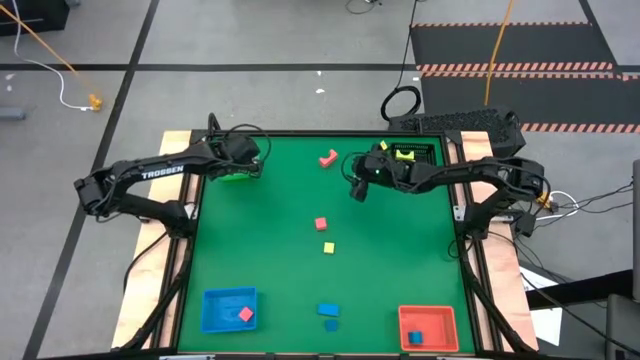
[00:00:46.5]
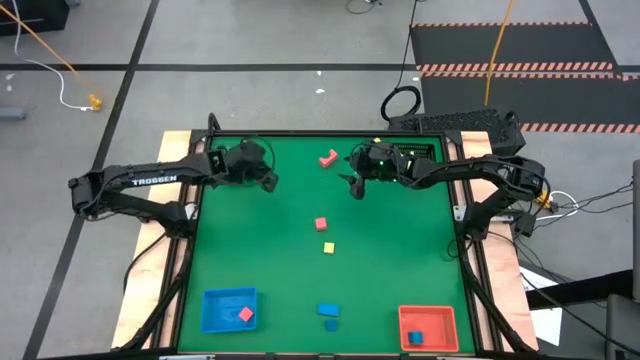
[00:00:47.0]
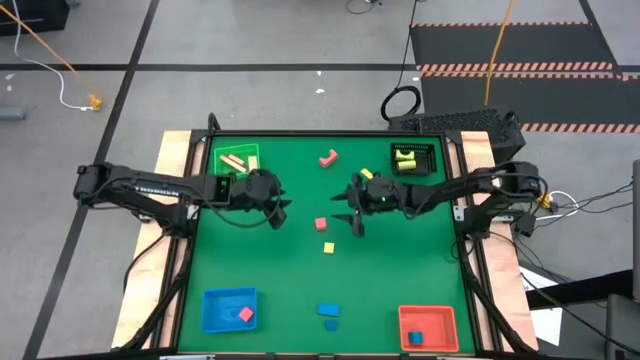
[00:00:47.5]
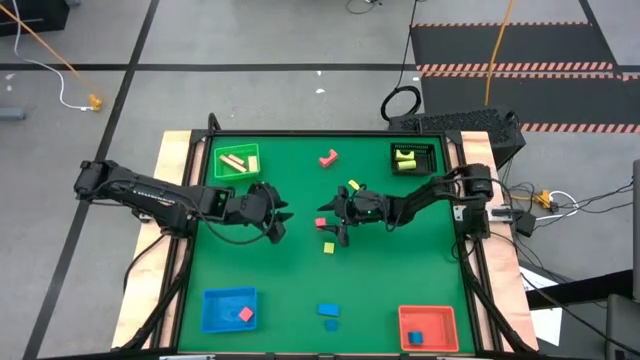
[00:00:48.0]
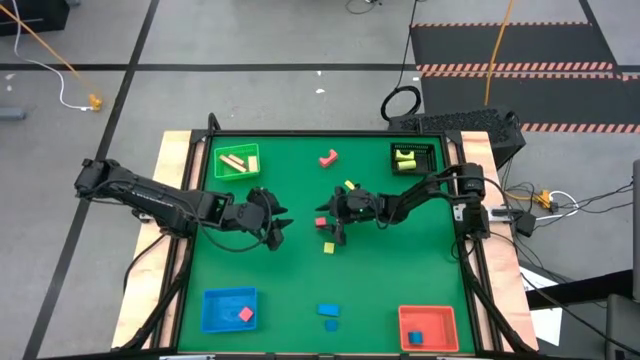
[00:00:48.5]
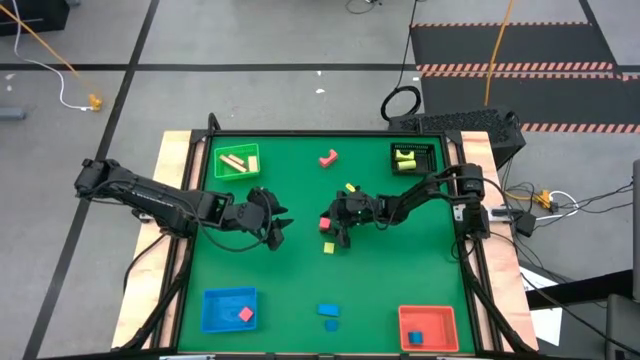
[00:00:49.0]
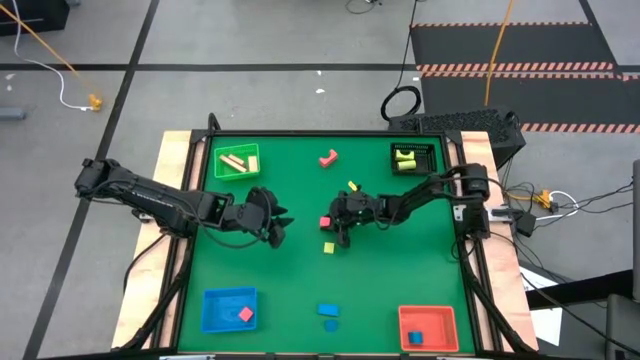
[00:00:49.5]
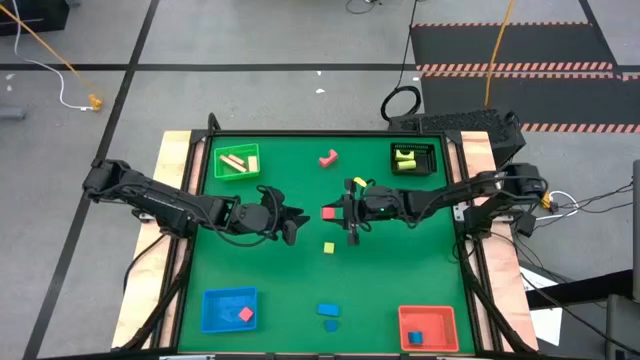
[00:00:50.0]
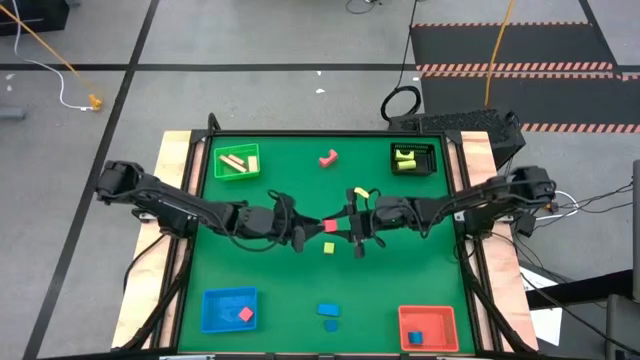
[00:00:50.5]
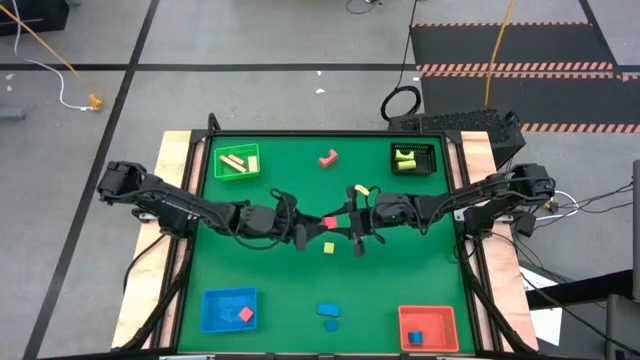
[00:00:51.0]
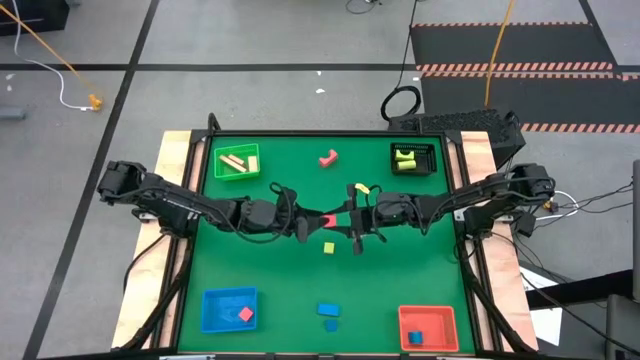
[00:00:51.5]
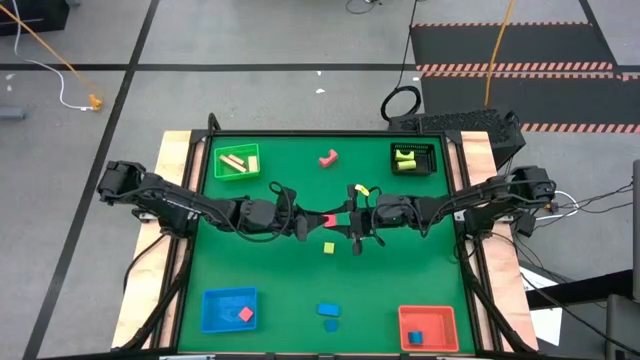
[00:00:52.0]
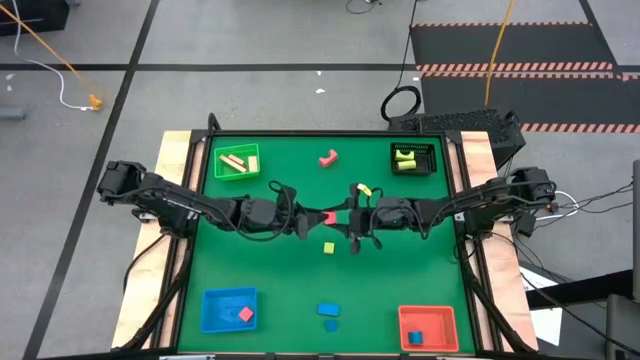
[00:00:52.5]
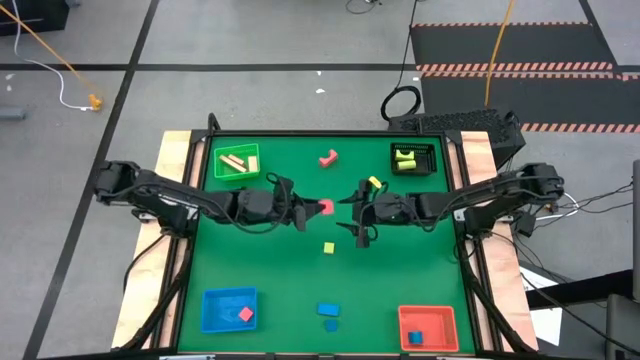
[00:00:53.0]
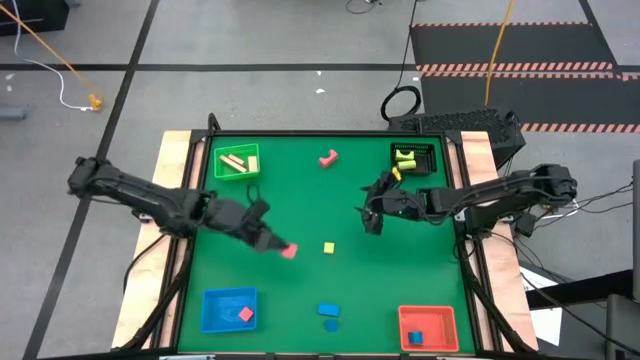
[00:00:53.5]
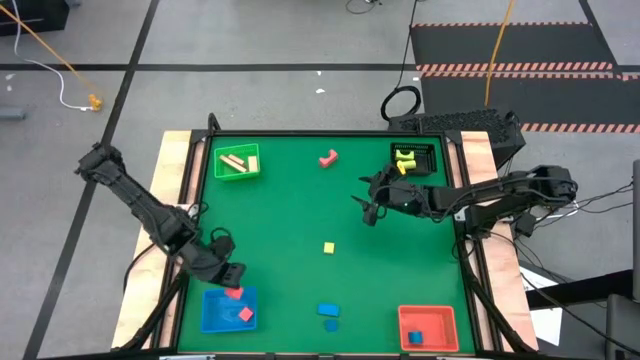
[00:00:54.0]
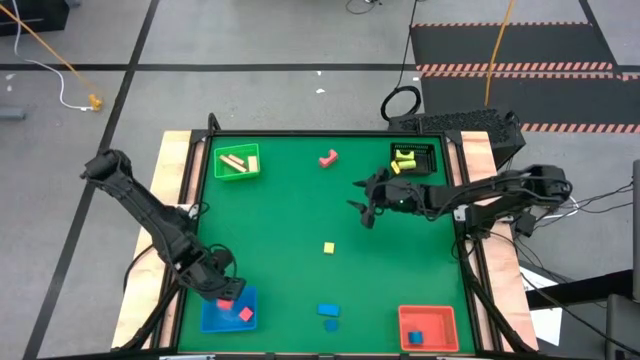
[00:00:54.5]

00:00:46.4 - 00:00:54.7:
Task: Sort & place blocks by color
Put the bottom orange block into the blue bin

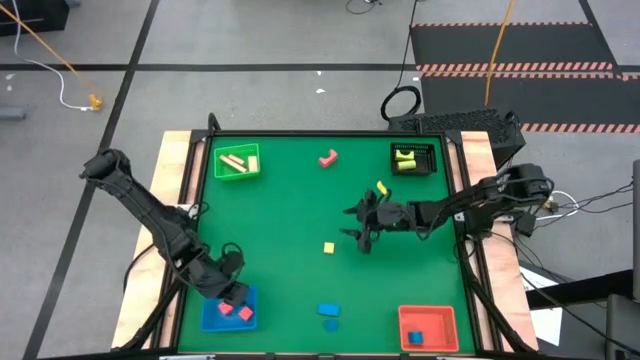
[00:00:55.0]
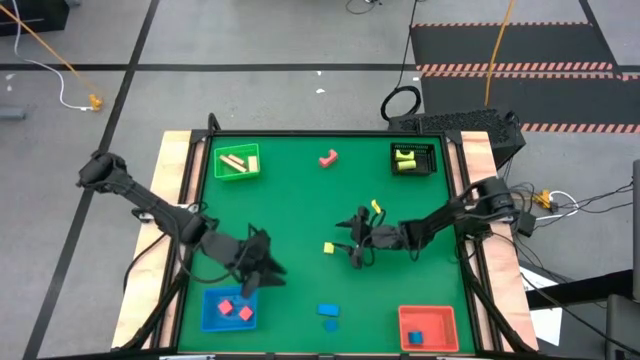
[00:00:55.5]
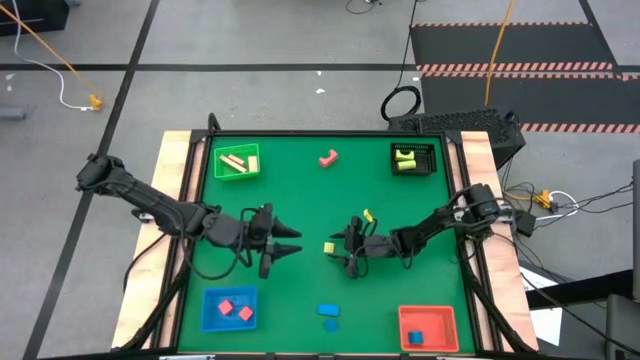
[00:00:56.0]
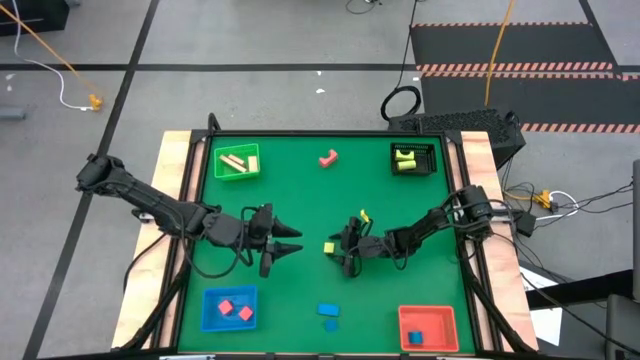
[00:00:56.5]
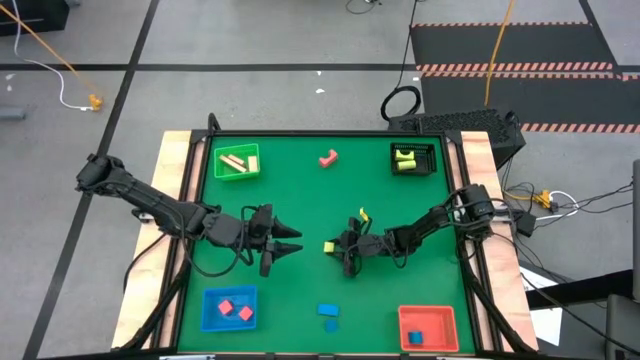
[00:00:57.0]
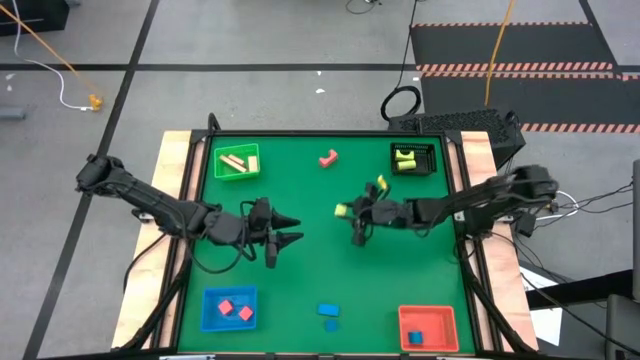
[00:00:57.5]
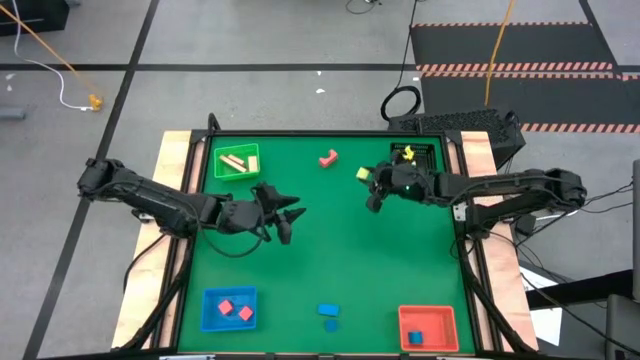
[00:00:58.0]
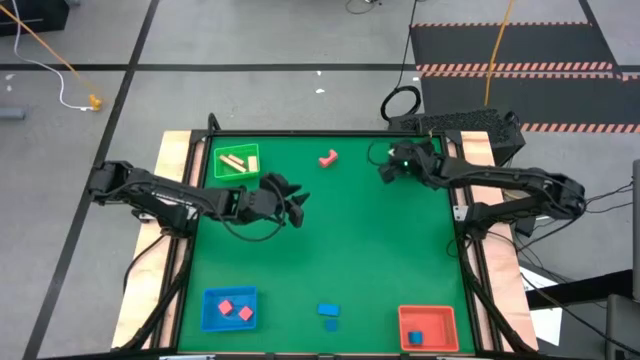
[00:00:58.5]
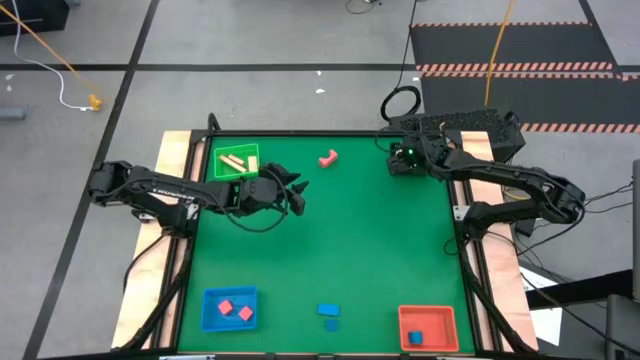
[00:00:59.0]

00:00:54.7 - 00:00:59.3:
Put the green block into the black bin

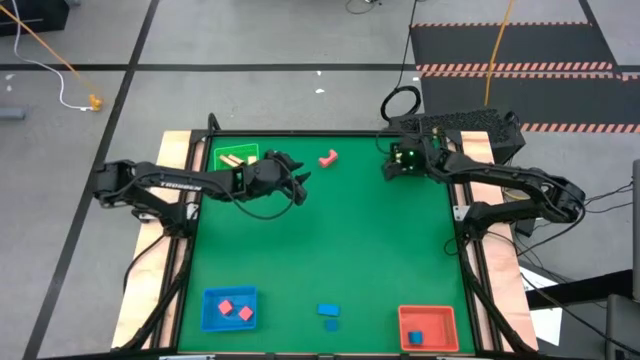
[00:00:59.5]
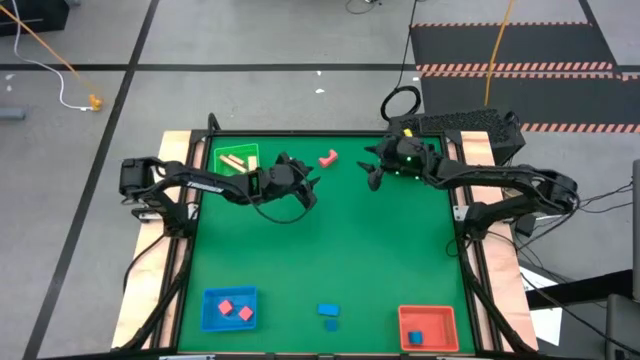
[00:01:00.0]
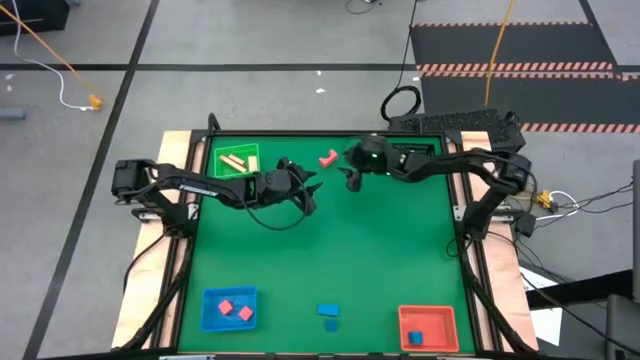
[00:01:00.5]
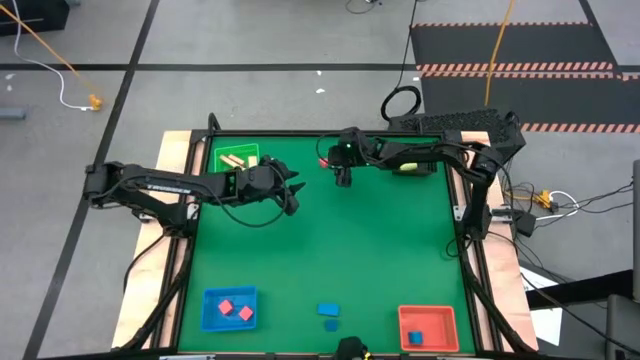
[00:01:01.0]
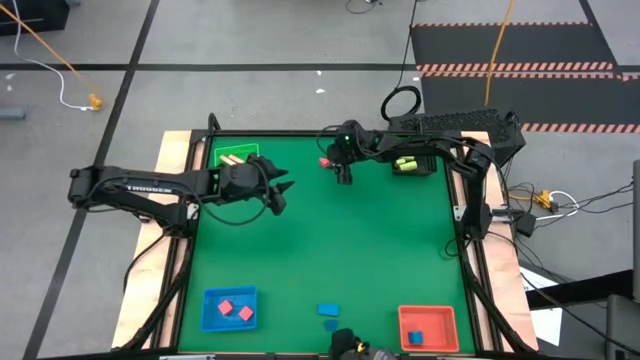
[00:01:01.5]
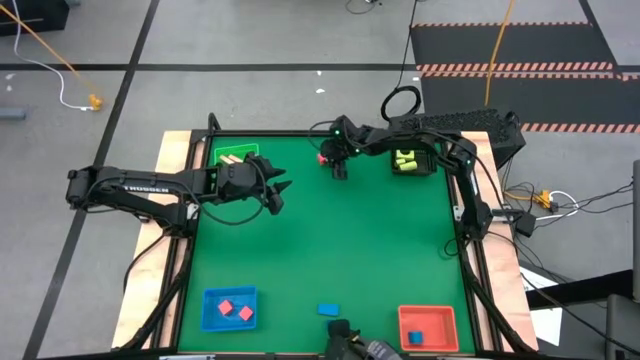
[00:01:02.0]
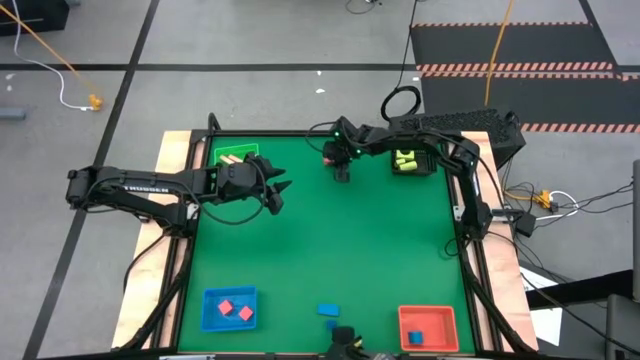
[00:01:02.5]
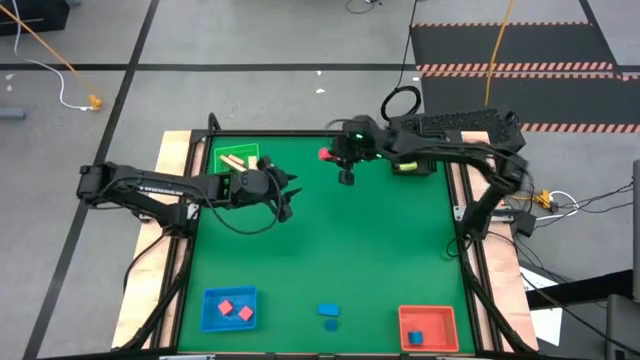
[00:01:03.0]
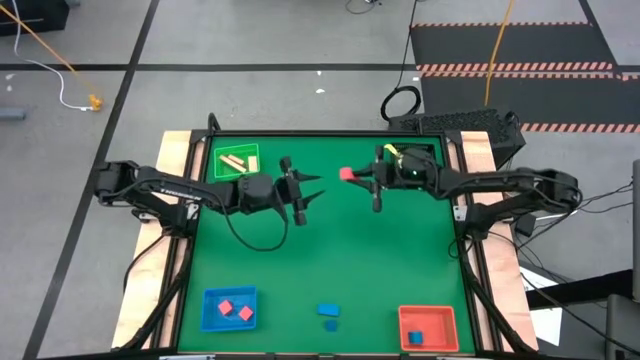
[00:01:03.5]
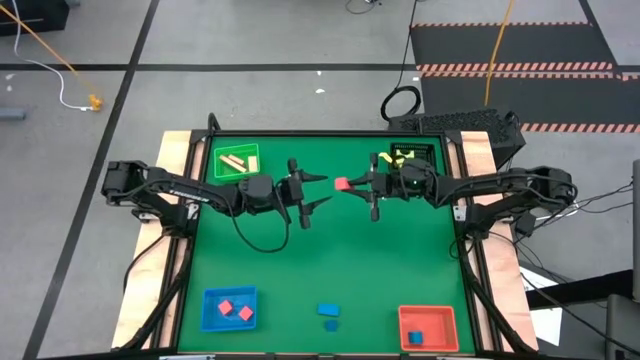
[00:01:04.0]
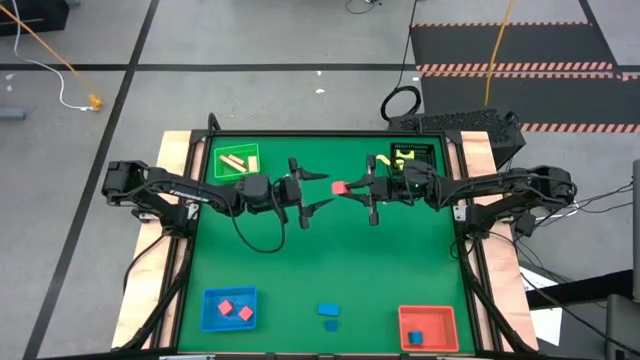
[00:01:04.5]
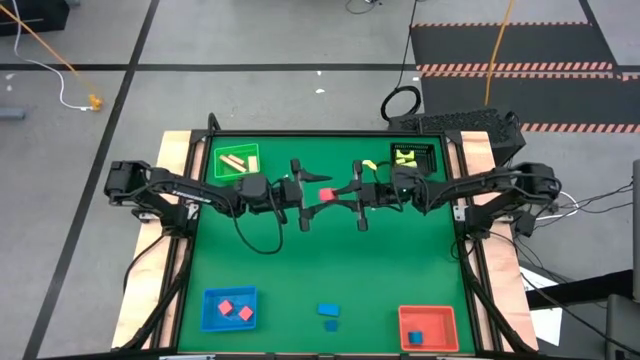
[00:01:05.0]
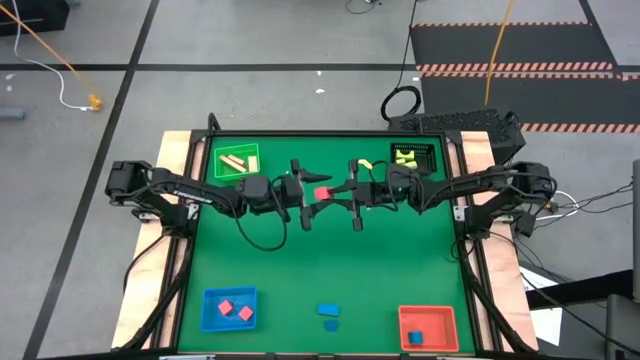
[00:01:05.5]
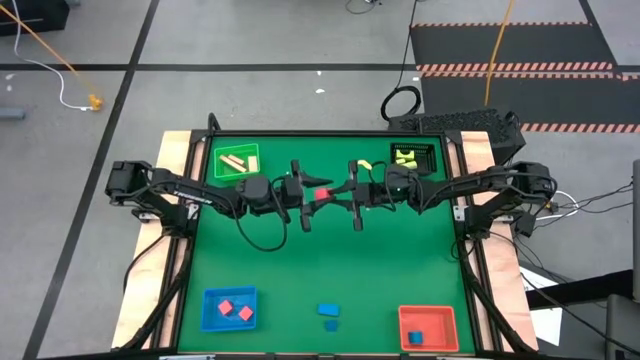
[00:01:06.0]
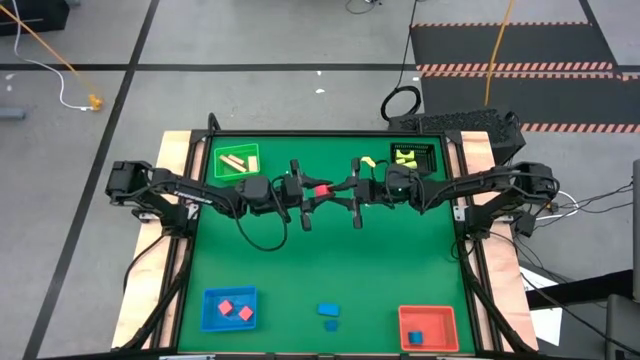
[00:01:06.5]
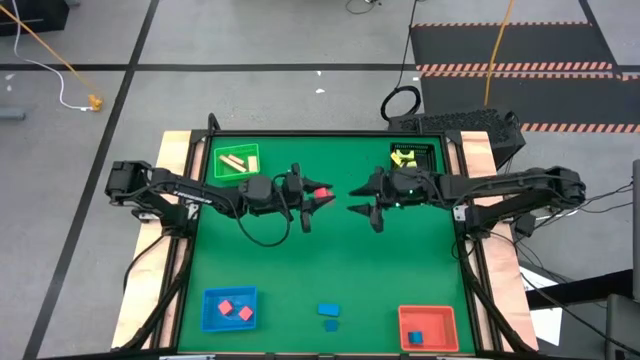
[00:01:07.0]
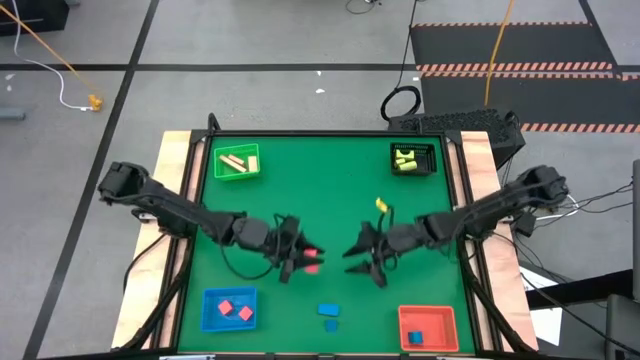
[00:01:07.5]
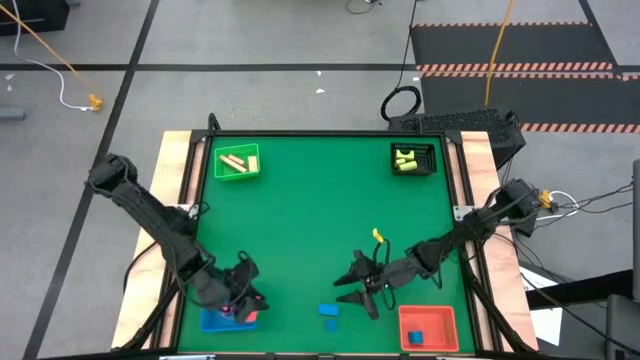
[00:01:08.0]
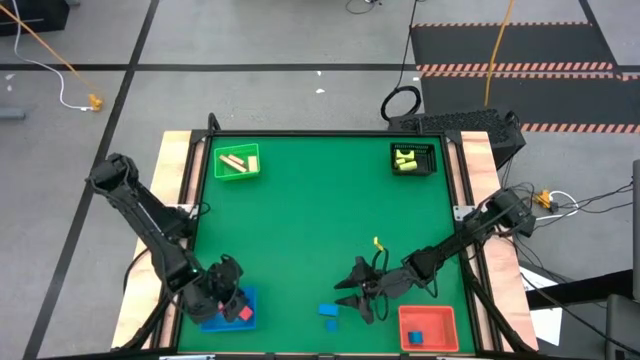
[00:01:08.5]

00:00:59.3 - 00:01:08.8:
Put the orange block into the blue bin
